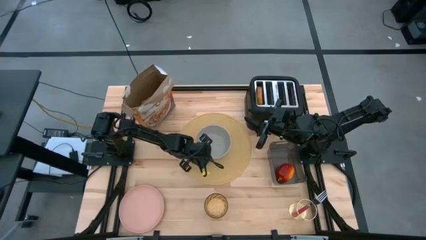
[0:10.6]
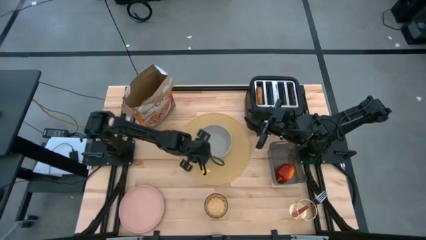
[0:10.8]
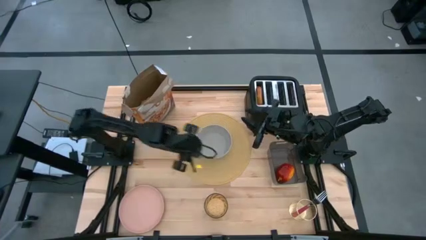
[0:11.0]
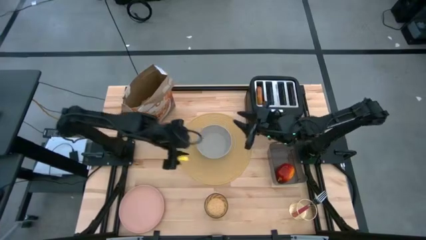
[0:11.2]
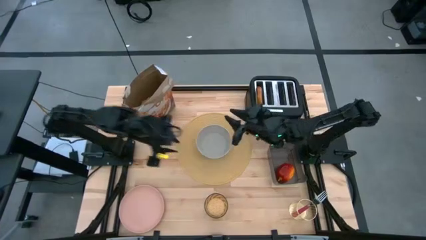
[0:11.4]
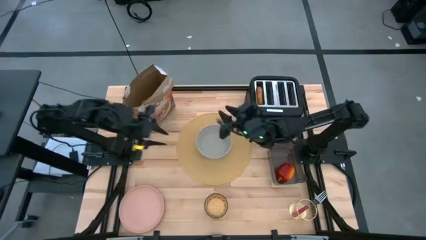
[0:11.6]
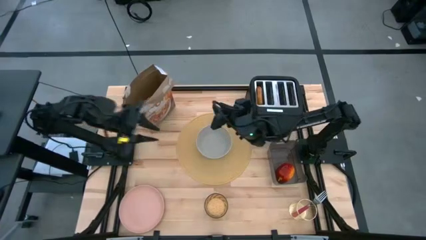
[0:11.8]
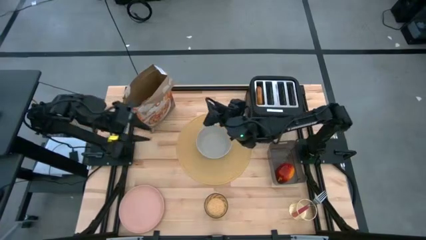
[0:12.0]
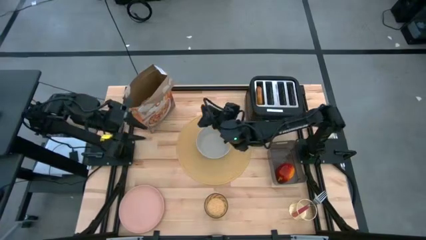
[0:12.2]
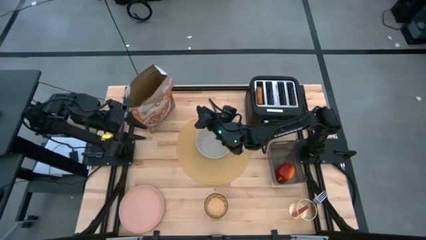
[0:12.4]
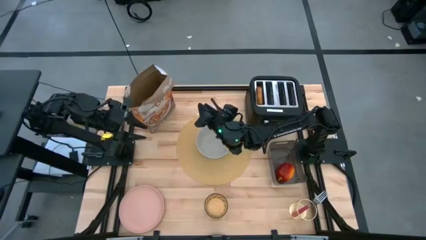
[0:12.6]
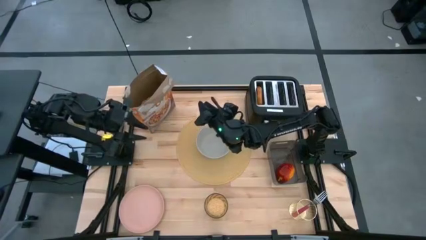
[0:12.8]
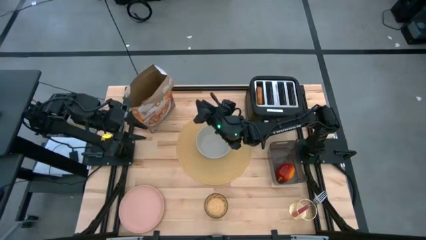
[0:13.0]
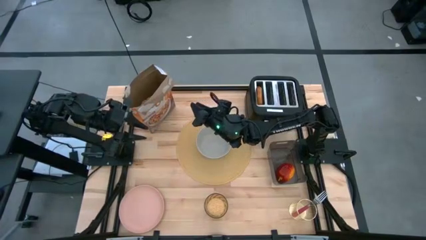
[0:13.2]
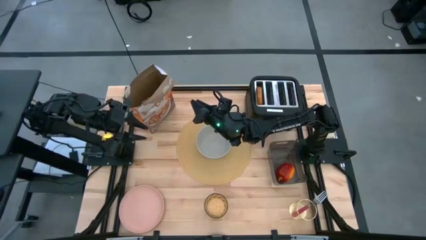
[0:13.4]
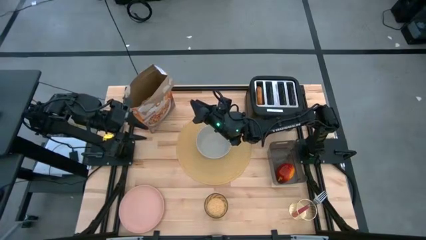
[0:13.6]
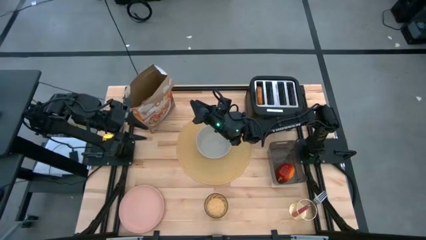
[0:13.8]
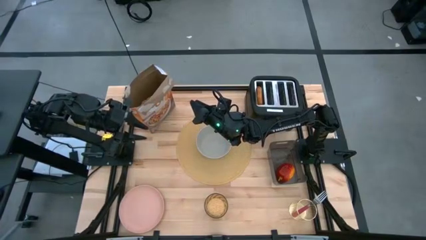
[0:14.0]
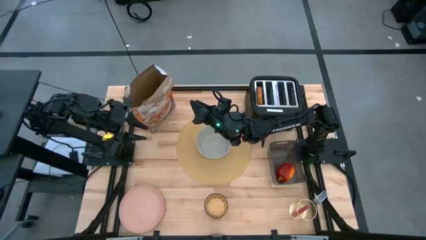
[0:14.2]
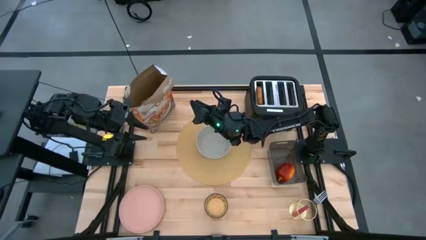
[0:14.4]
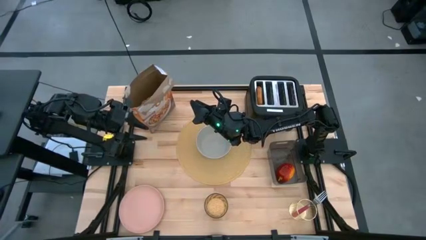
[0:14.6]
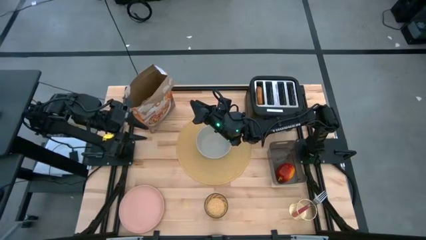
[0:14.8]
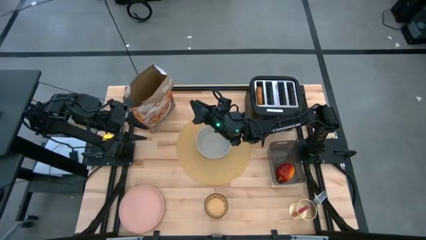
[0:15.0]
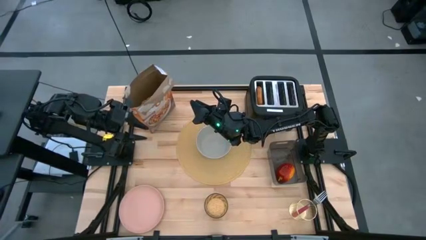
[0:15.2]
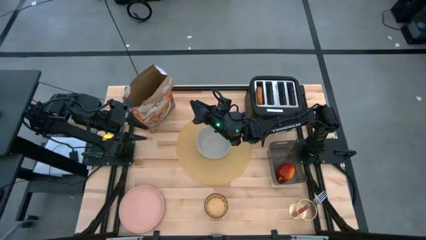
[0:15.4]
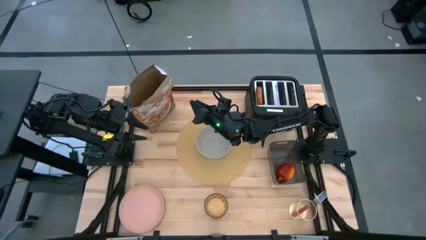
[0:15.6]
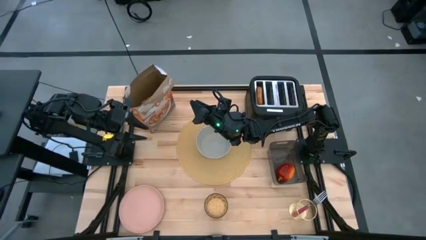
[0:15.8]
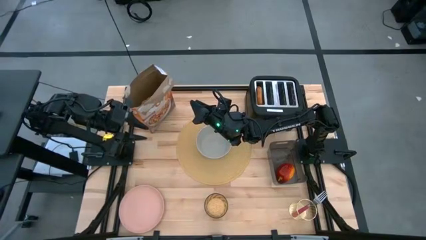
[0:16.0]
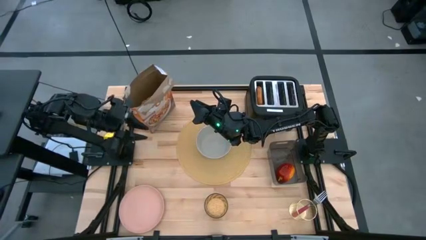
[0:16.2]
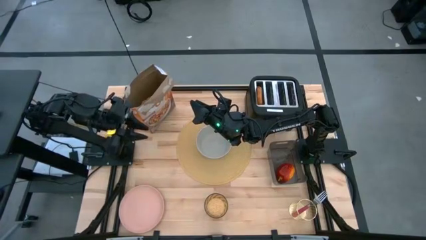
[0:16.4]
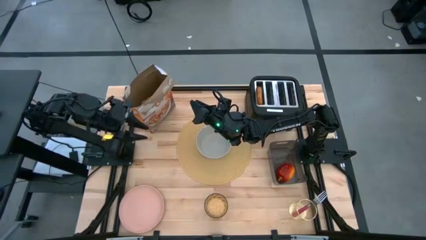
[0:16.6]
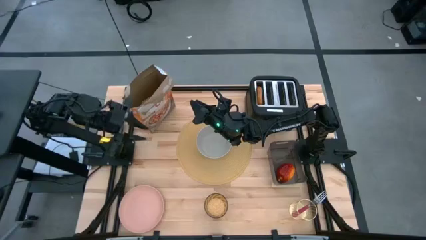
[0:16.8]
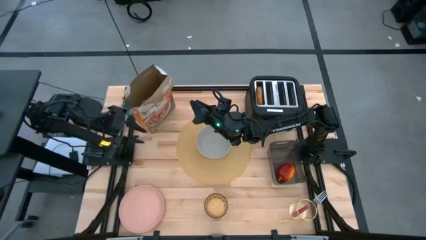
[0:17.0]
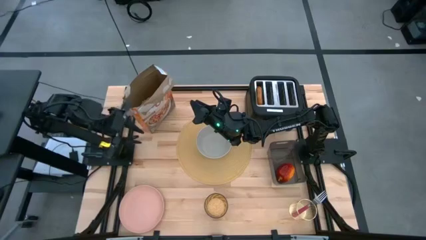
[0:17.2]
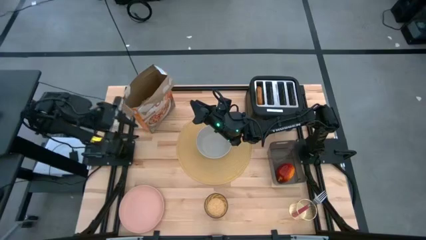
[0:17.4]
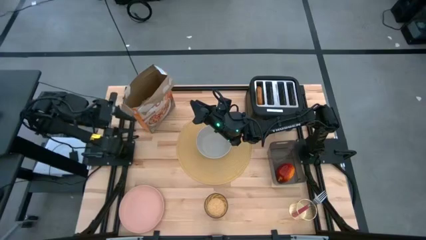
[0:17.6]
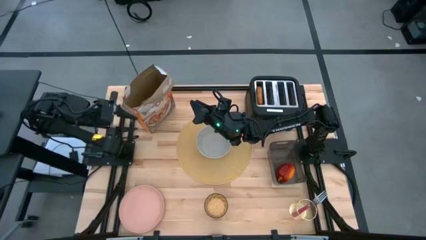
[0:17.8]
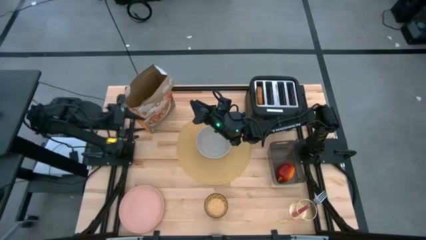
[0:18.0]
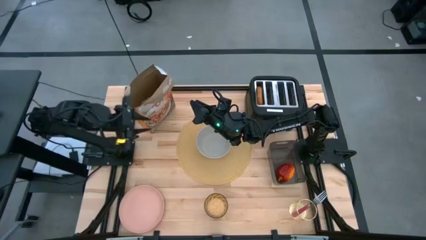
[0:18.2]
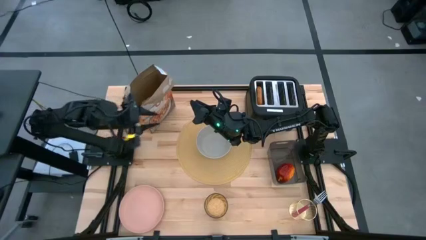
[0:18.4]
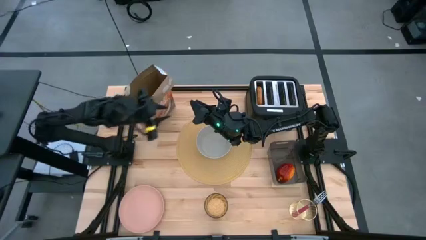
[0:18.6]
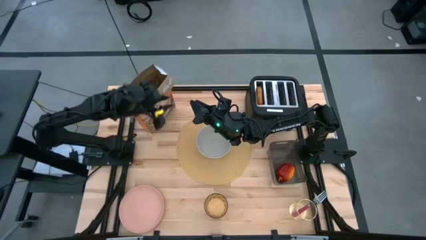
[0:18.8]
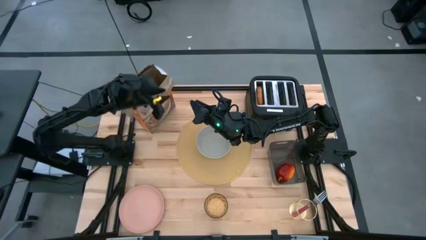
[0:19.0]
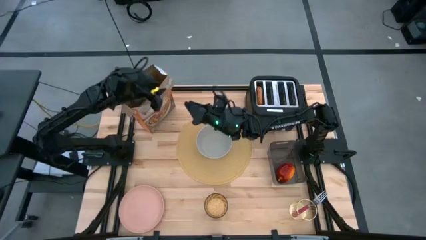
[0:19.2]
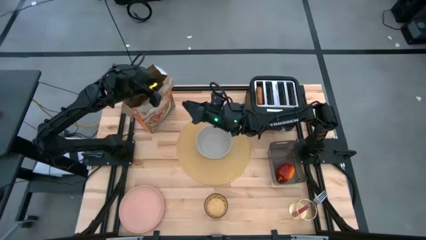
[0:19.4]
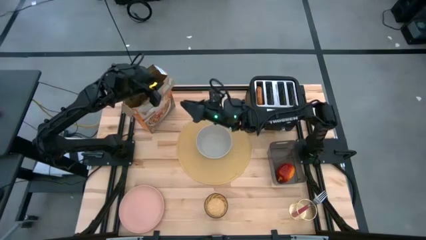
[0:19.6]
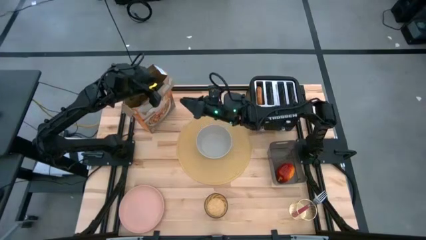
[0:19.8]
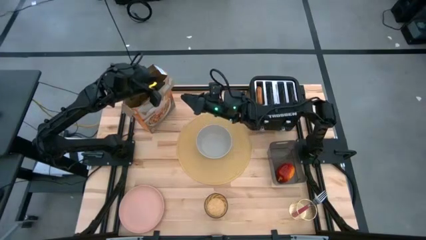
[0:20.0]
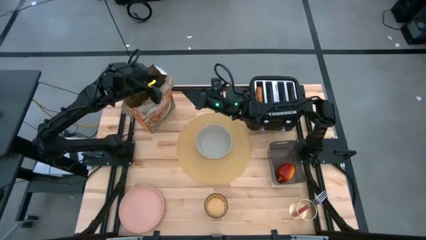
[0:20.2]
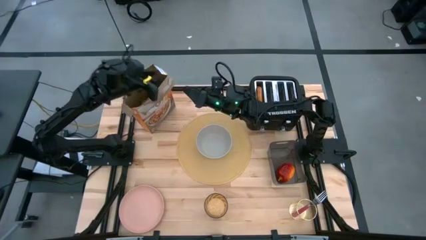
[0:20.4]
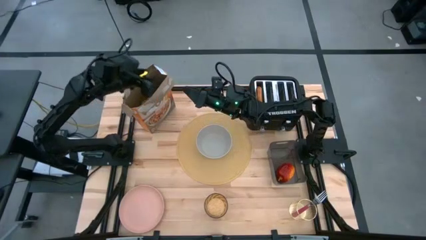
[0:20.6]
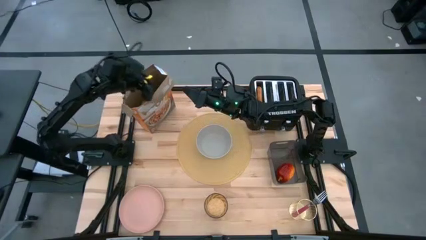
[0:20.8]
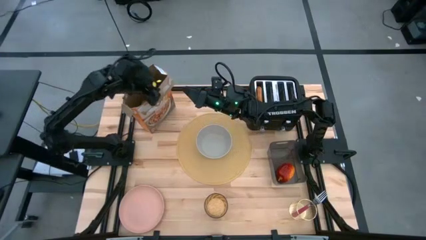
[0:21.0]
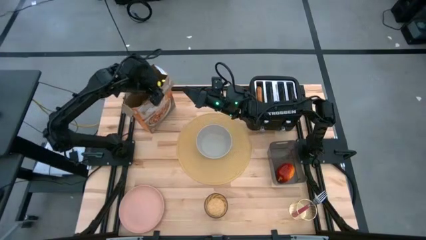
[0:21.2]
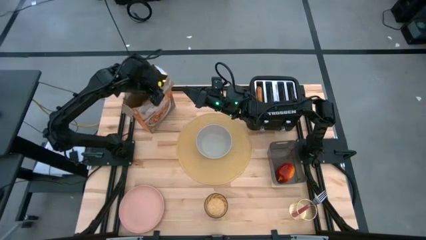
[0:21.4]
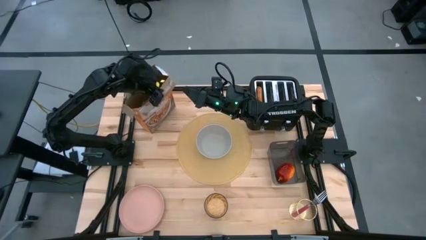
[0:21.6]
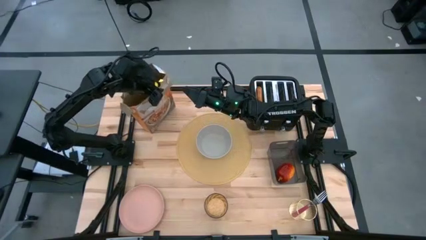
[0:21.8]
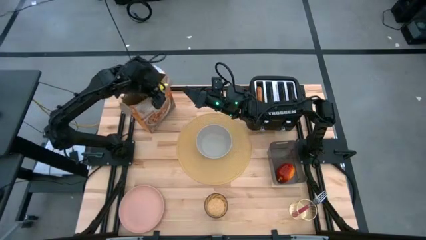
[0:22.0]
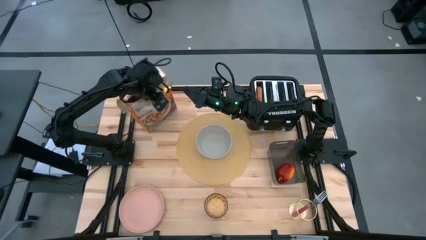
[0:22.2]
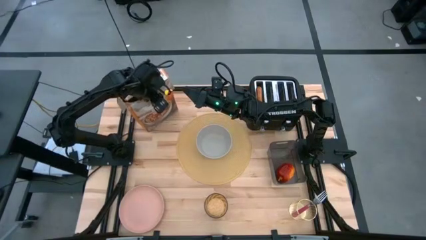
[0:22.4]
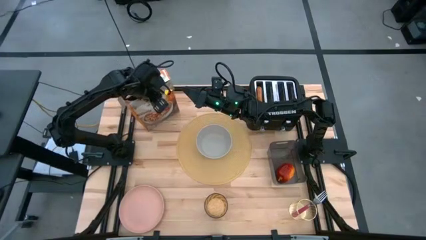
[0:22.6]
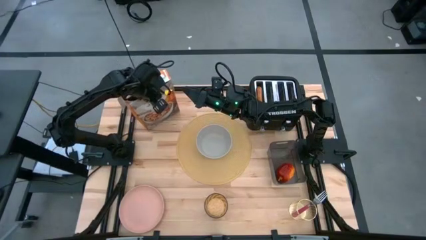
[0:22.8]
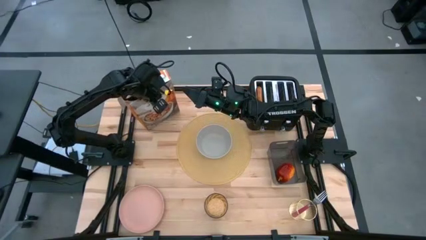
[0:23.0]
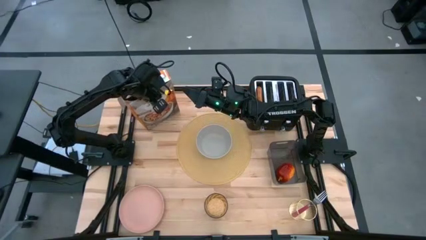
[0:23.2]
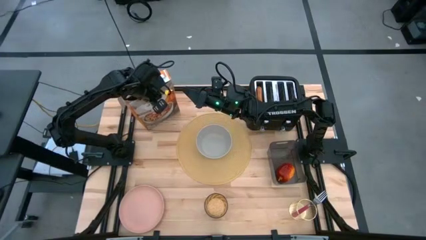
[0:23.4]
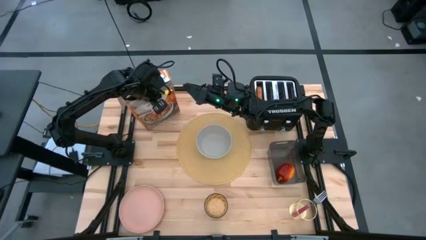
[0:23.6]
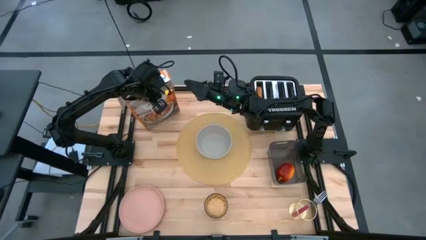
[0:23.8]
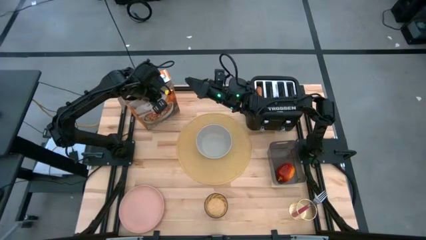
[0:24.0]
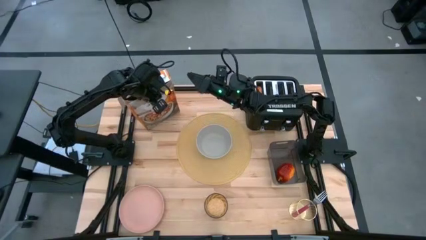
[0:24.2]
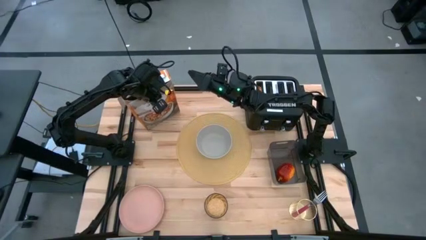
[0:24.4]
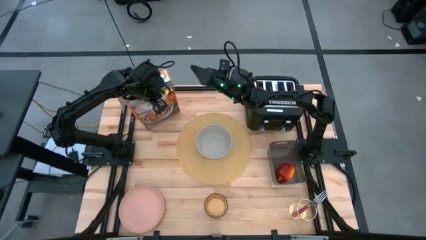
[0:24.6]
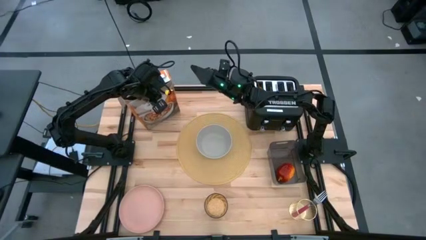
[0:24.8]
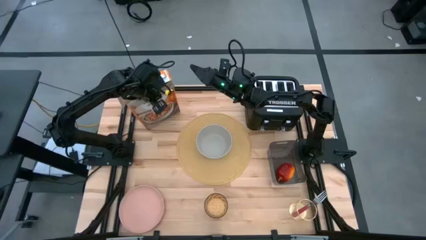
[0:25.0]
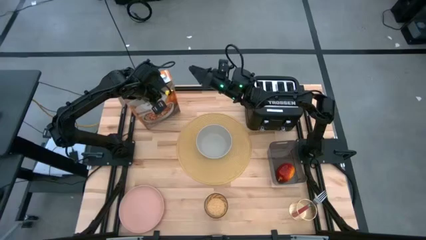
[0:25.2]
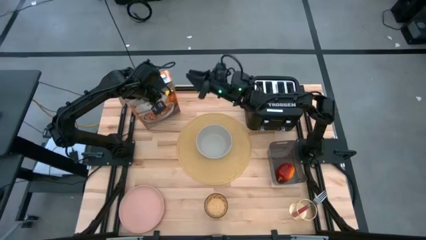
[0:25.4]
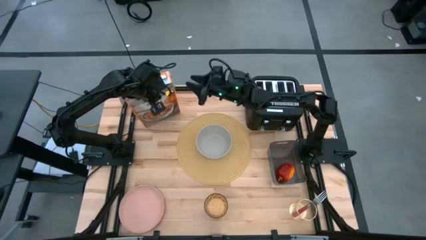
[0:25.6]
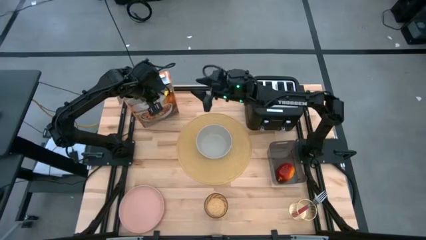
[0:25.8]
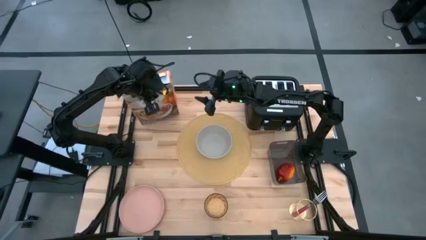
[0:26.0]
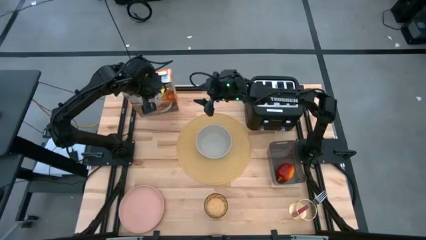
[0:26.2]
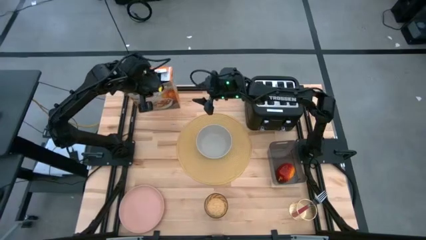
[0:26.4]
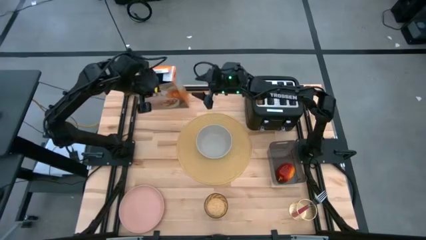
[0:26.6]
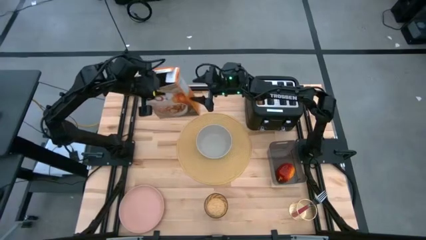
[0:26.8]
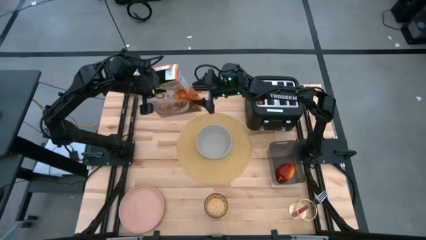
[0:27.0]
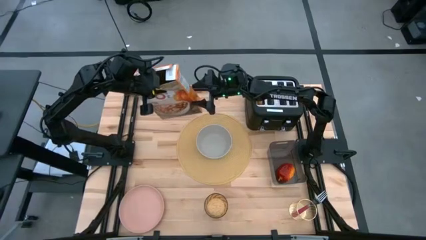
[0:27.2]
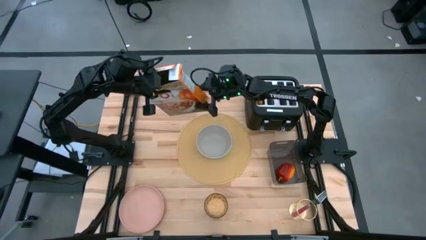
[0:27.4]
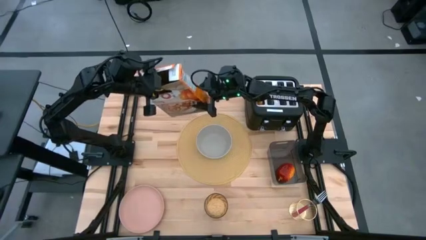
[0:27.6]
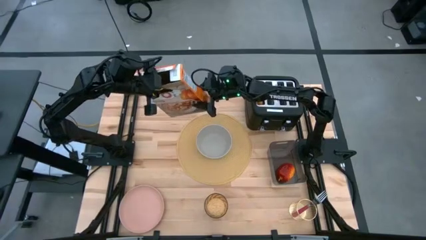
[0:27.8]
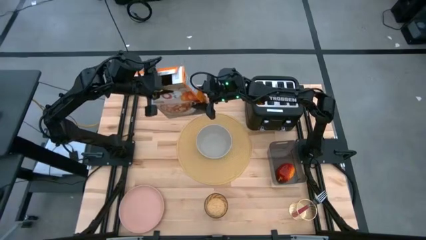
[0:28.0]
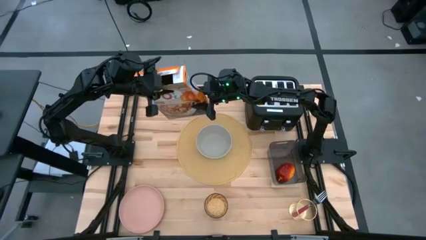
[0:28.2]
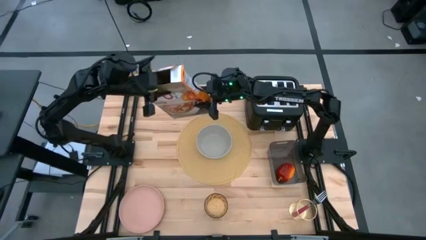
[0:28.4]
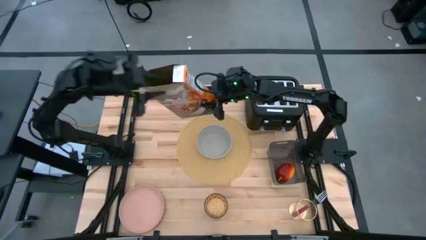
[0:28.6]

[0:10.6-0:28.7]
Task: Arrange a breakfast setting
Pour the cereal from the brown cereal box into the gray bowl
